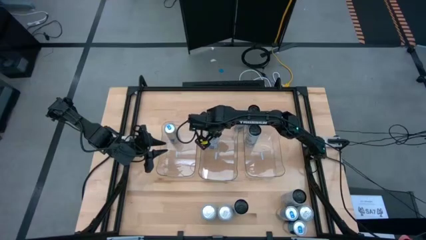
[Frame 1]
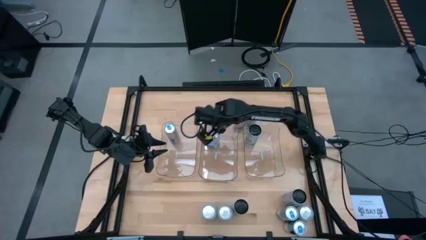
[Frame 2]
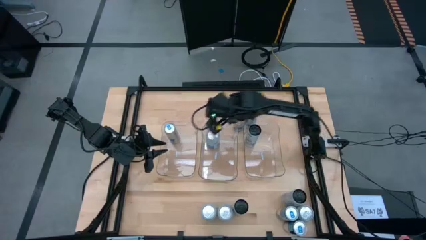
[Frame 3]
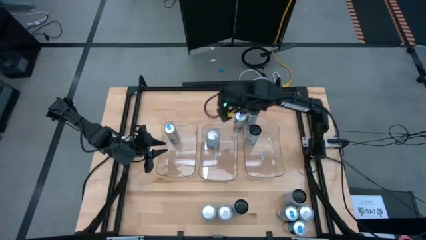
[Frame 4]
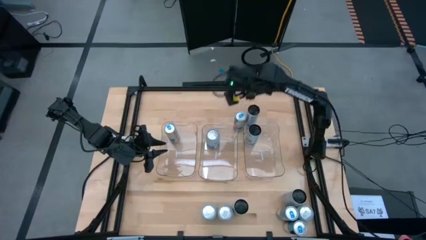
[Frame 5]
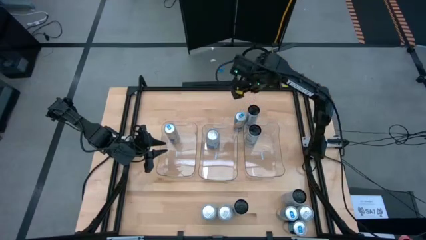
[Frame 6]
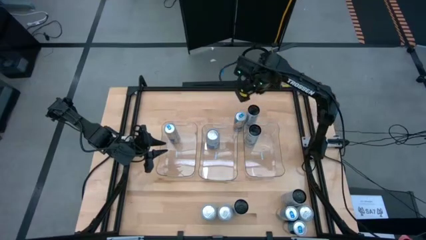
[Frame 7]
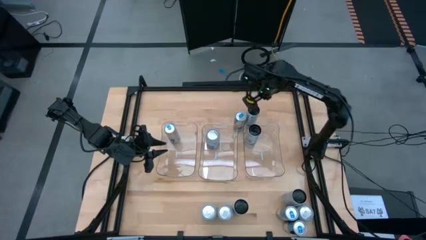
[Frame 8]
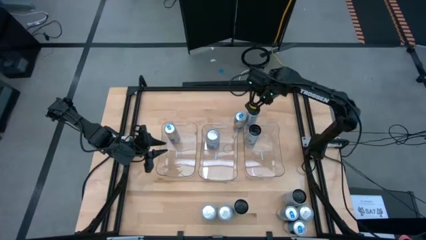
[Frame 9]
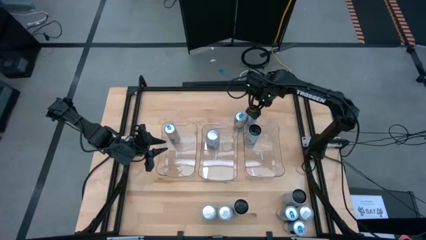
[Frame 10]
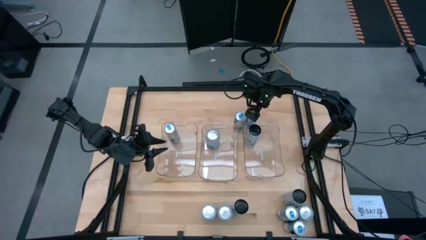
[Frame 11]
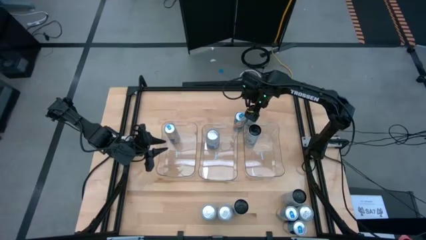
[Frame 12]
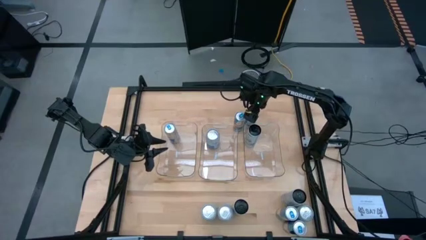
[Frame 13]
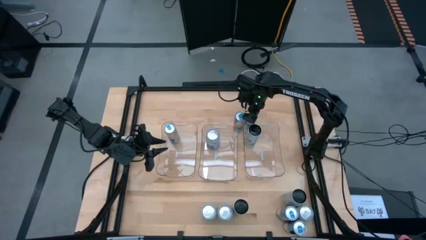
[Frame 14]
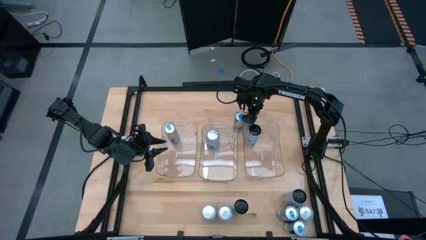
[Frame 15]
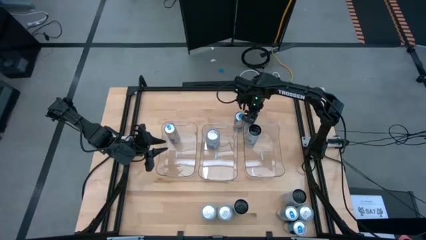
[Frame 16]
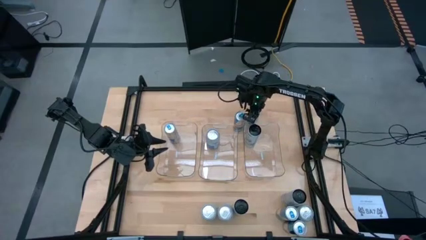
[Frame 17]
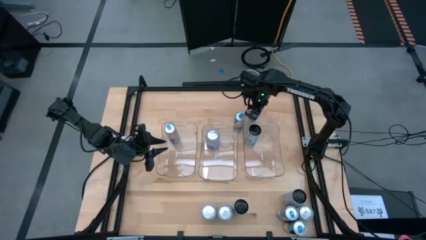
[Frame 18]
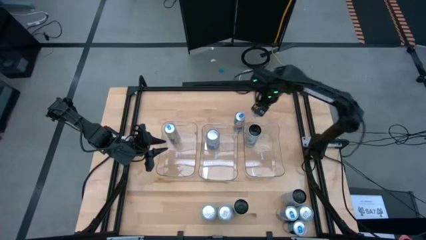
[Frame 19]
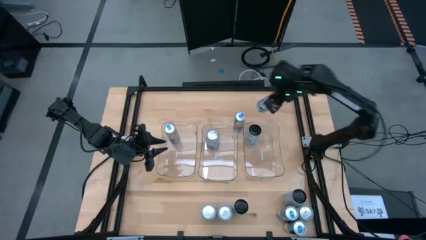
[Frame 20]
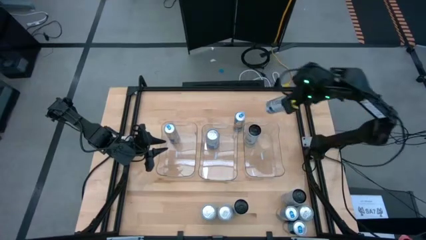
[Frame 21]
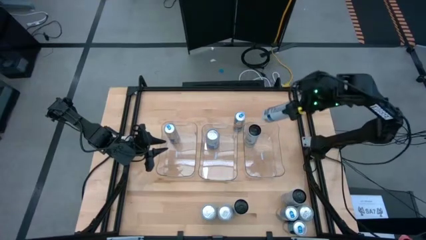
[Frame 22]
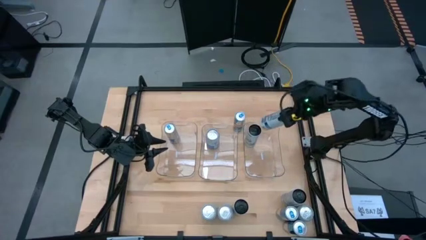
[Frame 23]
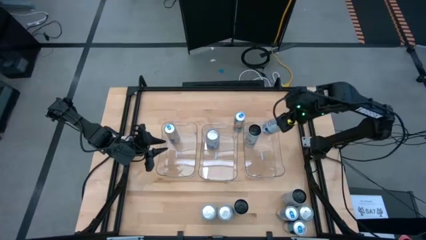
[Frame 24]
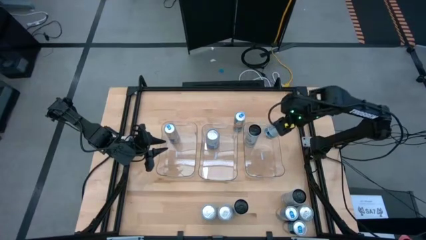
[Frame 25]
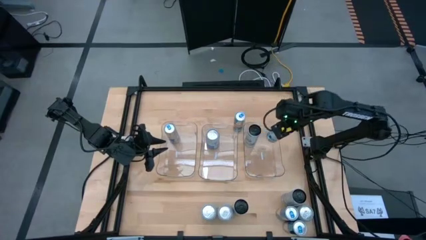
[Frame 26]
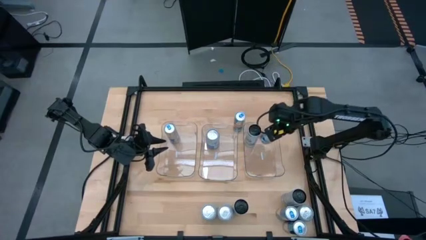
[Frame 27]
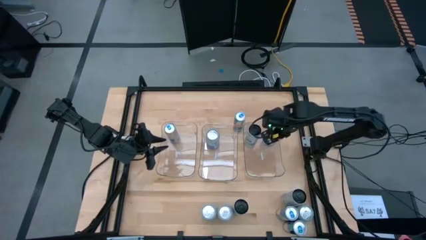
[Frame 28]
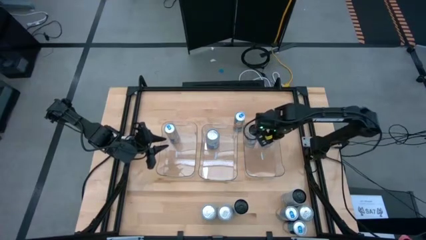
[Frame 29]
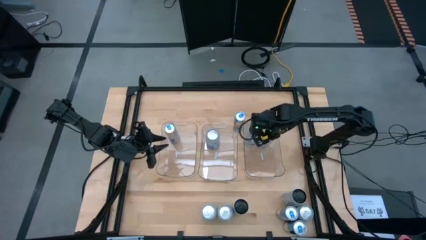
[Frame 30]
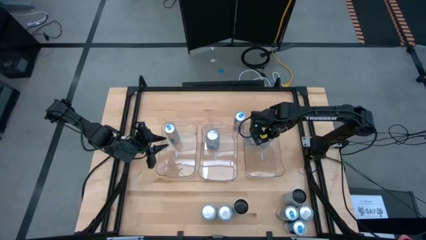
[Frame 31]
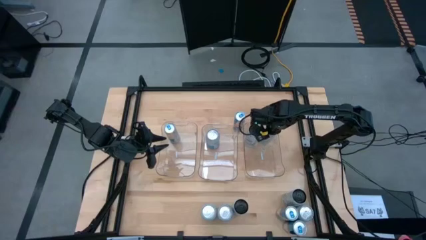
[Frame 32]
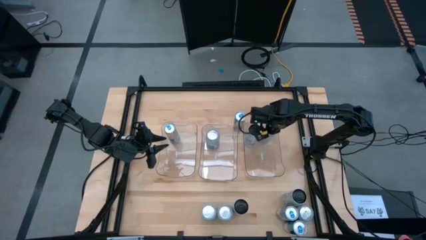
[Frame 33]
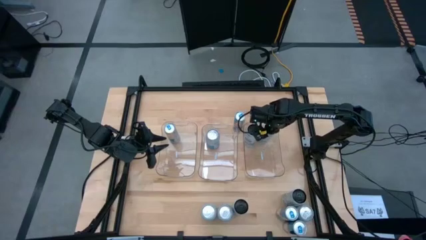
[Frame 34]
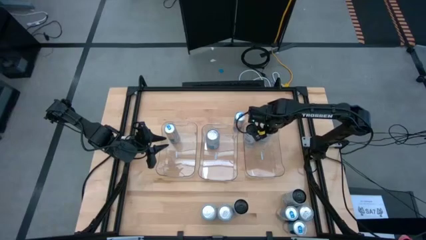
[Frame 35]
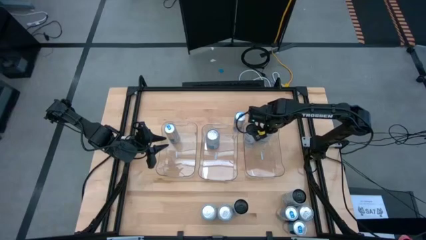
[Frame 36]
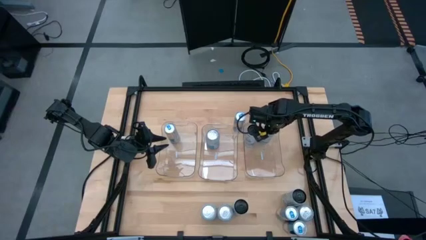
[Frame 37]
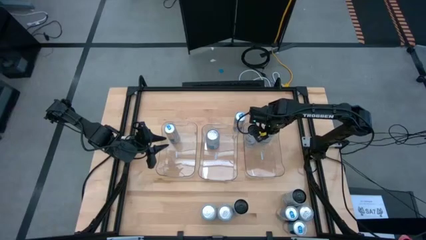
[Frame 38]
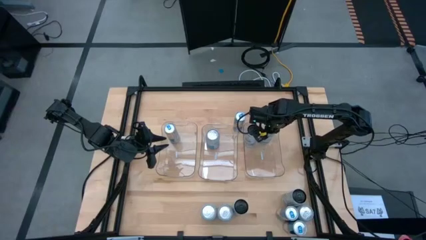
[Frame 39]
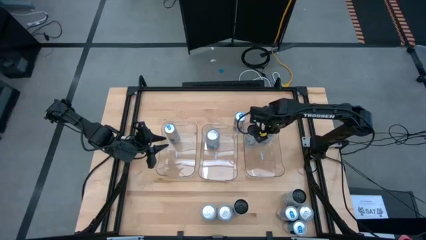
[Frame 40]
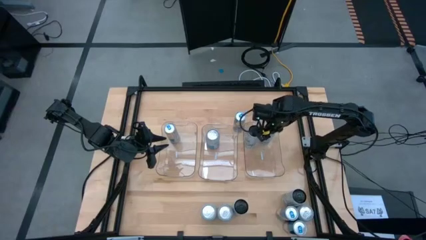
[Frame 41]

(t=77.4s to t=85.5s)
Task: Sort soda cans
Put the top white soda can into the right transparent bin

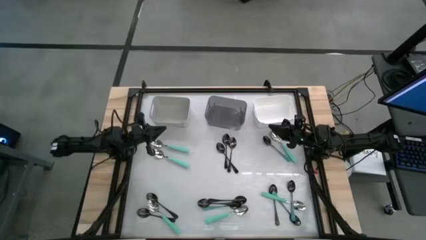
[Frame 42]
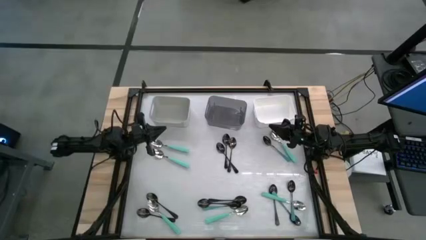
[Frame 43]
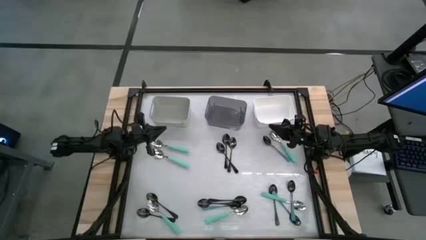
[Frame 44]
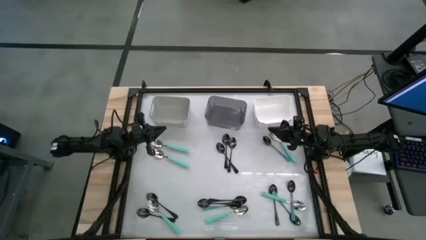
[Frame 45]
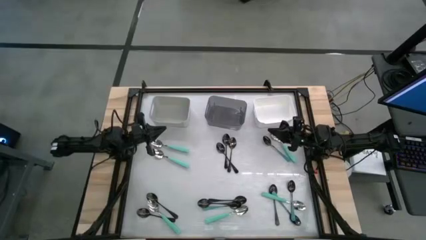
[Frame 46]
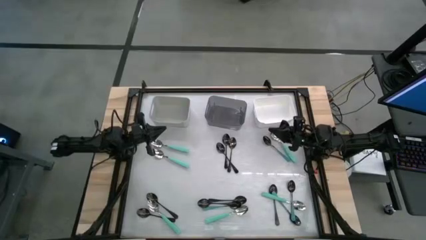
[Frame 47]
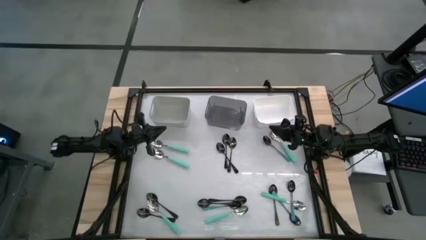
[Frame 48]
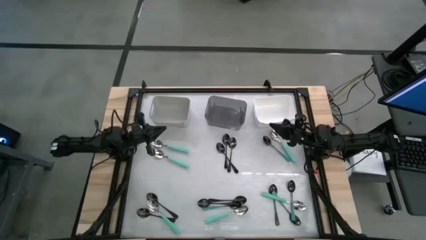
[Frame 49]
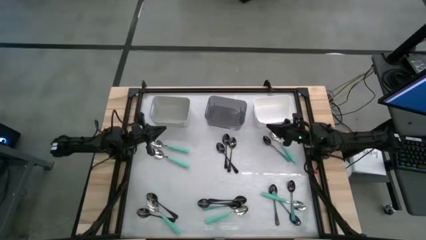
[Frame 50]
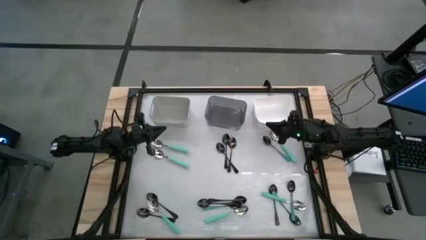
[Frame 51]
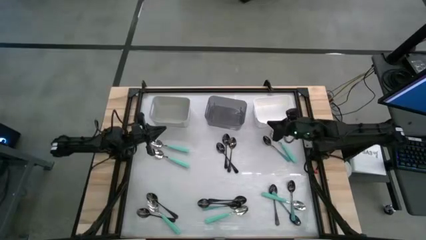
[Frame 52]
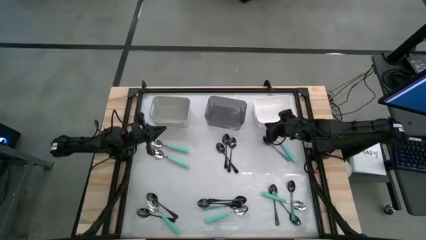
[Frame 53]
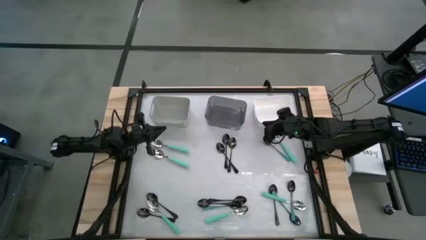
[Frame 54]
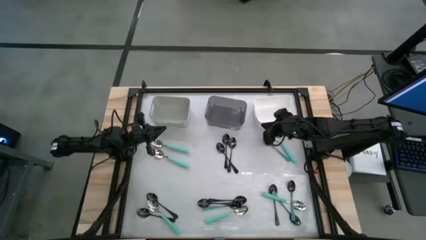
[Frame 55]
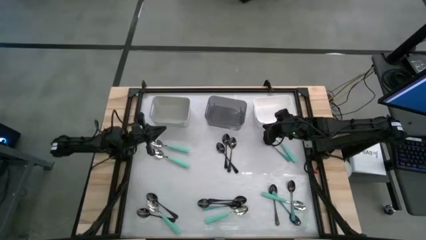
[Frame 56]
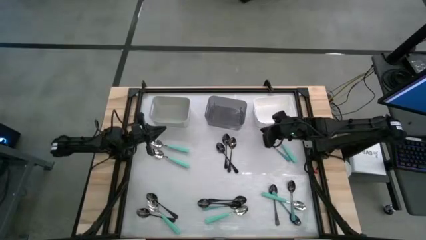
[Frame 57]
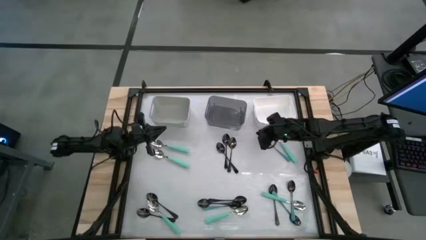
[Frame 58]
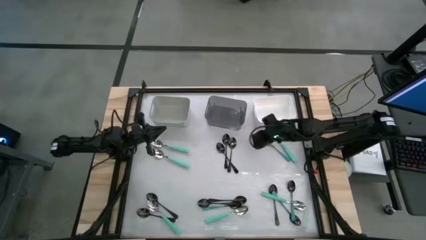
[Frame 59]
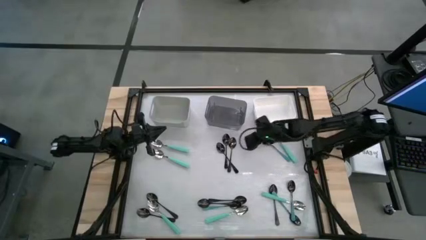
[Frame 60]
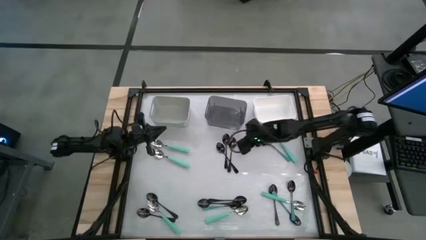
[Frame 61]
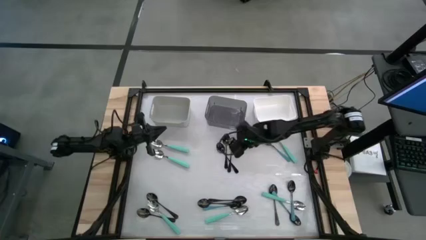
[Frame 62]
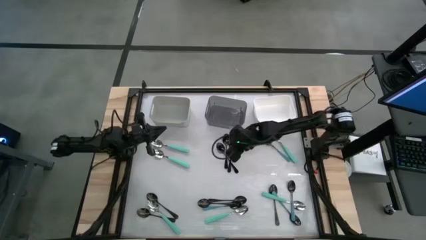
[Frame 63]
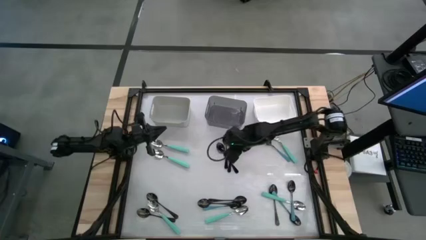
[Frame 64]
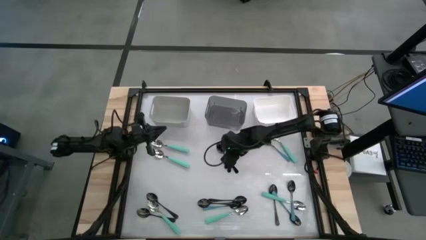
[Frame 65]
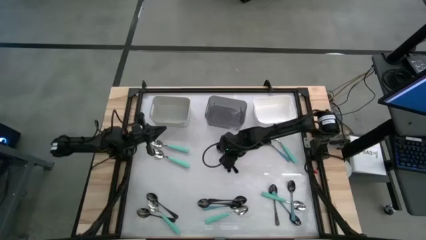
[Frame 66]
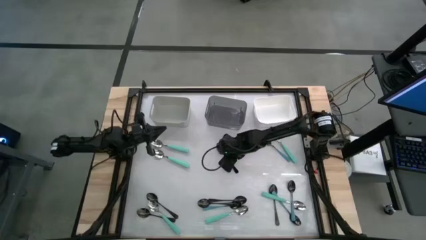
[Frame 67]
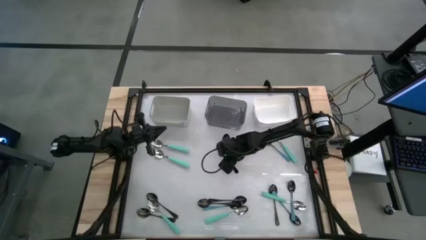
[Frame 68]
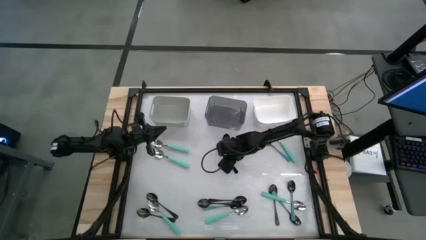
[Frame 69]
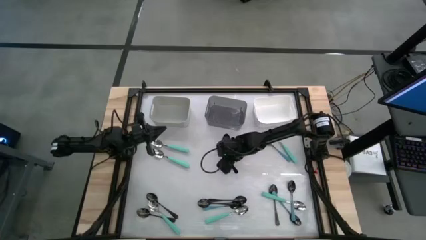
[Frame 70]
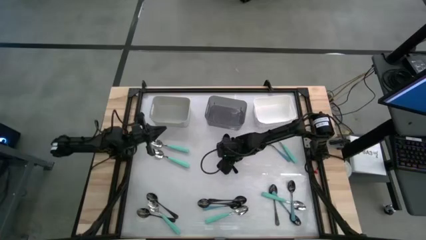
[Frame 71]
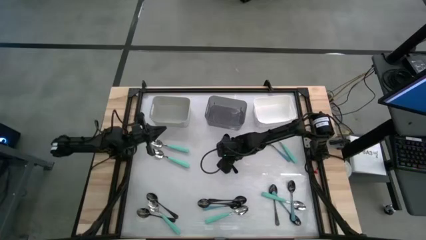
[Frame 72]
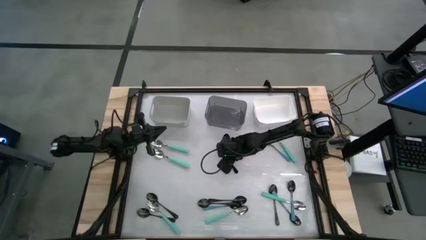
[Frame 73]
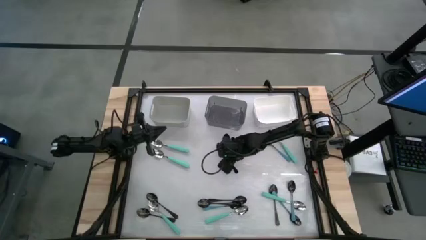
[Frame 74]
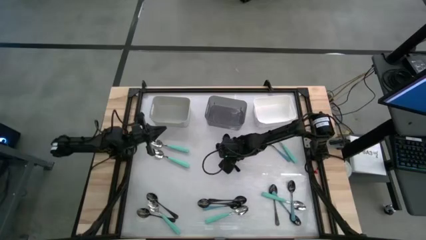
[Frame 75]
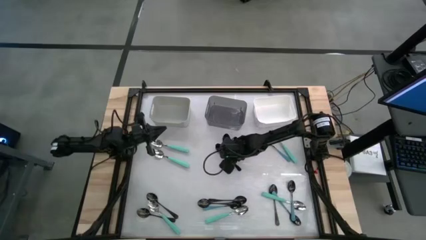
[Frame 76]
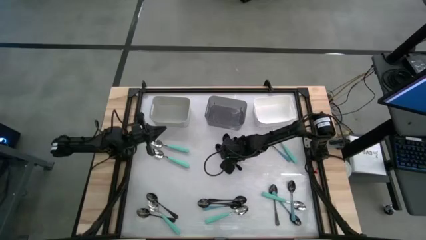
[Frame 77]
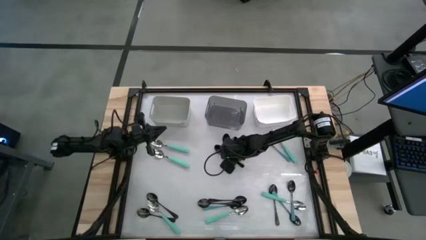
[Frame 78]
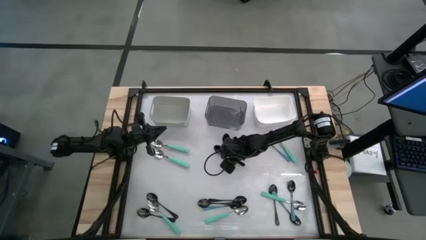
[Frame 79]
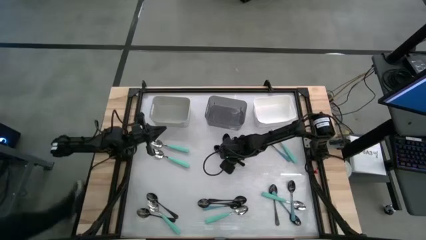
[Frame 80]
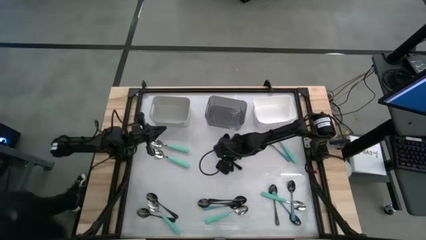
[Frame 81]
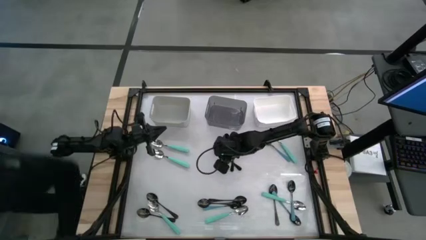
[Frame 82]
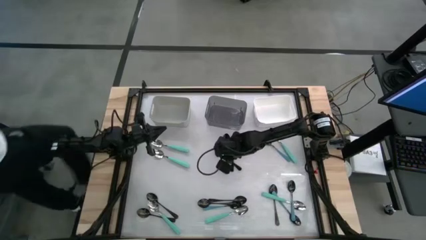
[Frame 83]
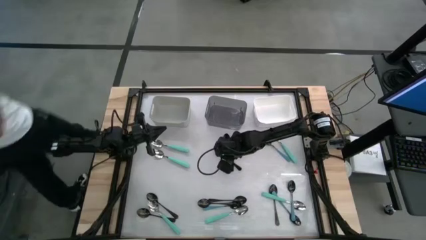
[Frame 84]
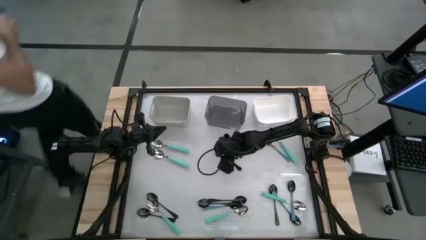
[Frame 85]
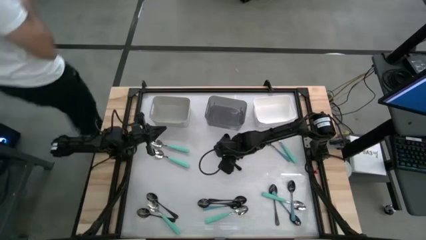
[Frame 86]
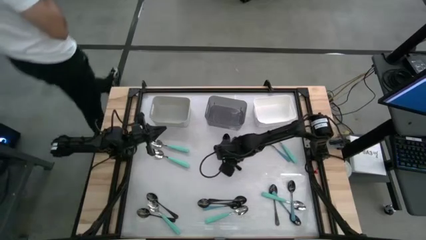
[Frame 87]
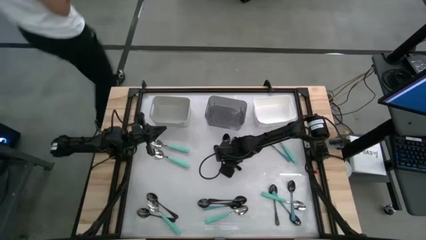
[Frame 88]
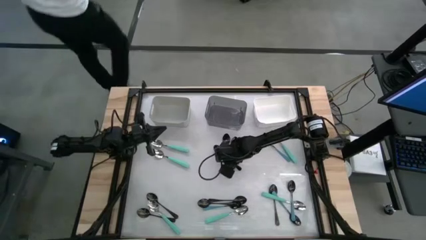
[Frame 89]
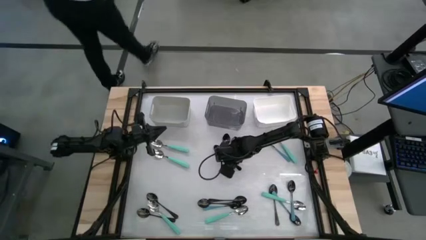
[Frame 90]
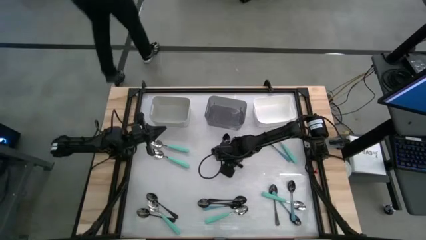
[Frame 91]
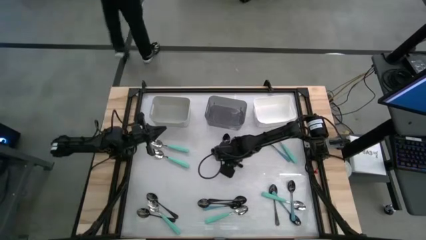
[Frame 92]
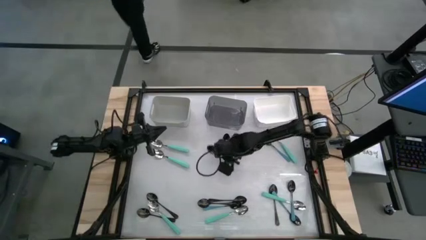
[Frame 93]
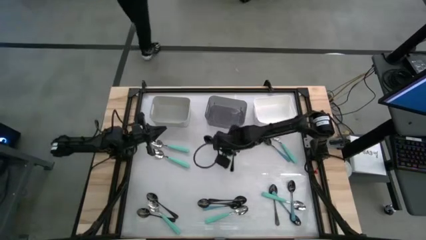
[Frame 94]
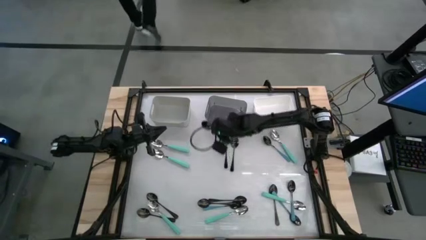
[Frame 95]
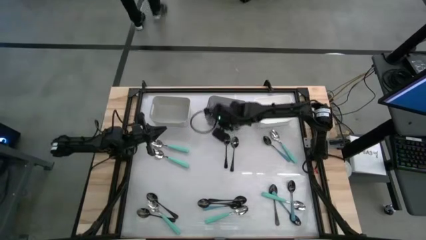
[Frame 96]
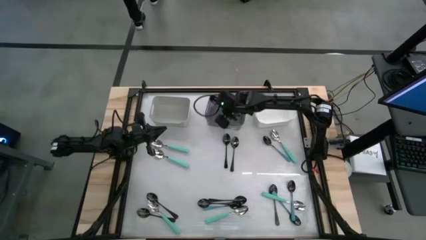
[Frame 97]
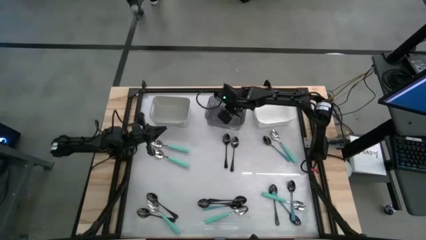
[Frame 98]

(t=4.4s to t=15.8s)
Task: Sort silverware by color (type)
Put the black spoon into the top black bin
